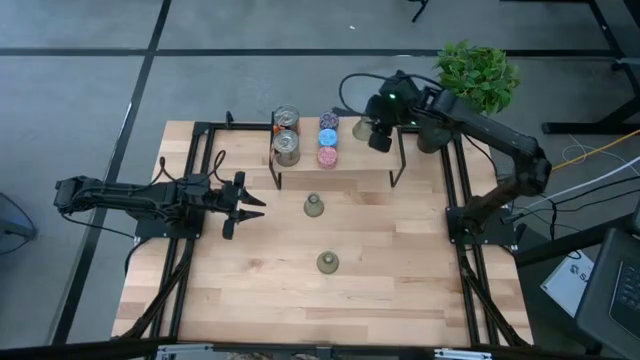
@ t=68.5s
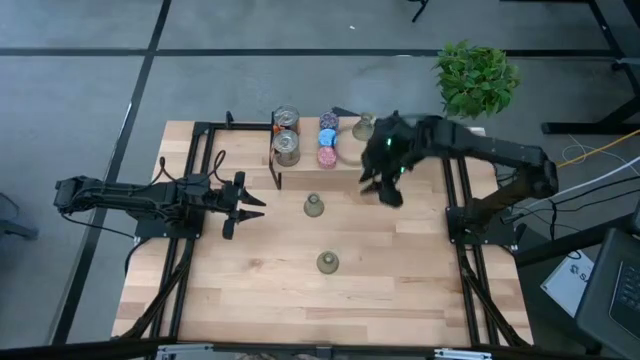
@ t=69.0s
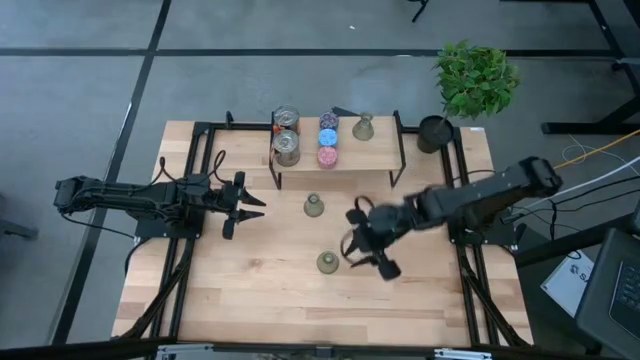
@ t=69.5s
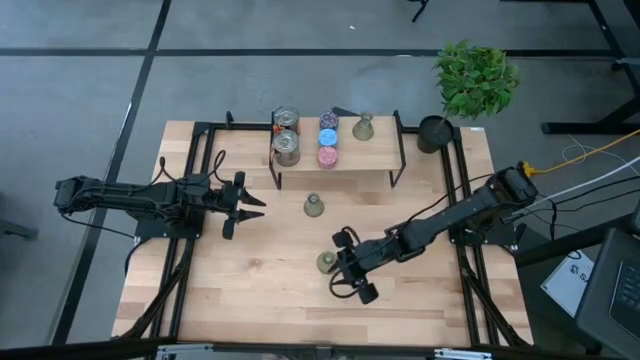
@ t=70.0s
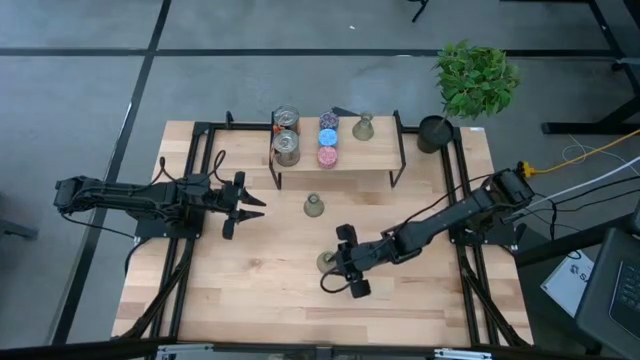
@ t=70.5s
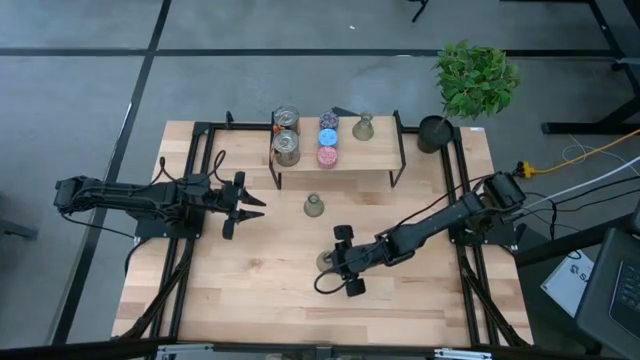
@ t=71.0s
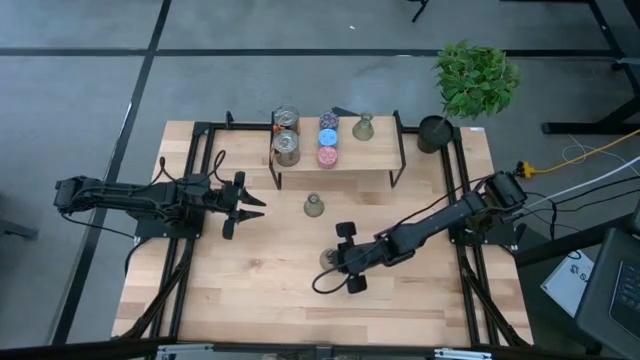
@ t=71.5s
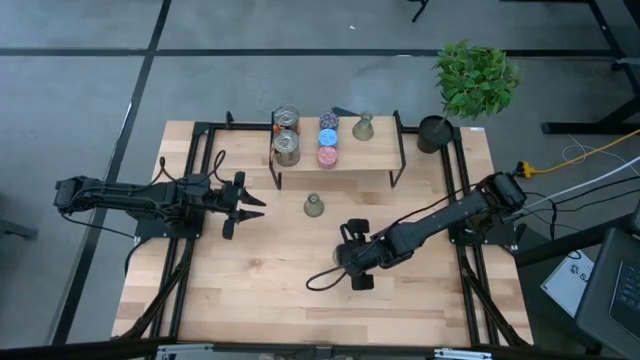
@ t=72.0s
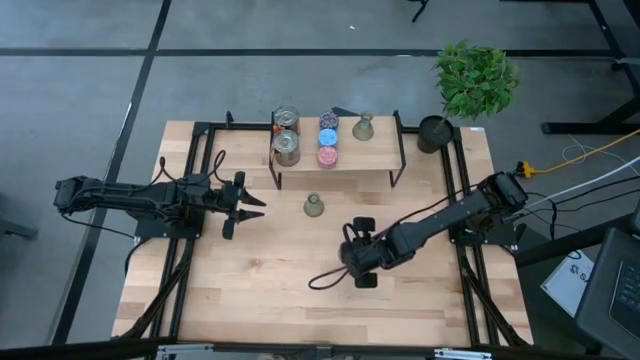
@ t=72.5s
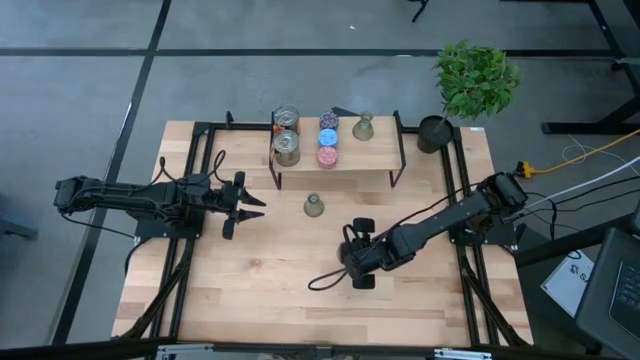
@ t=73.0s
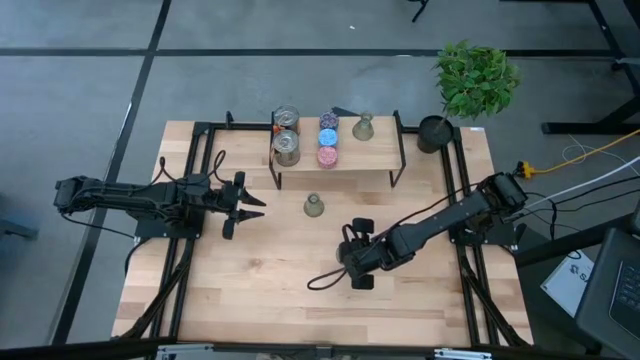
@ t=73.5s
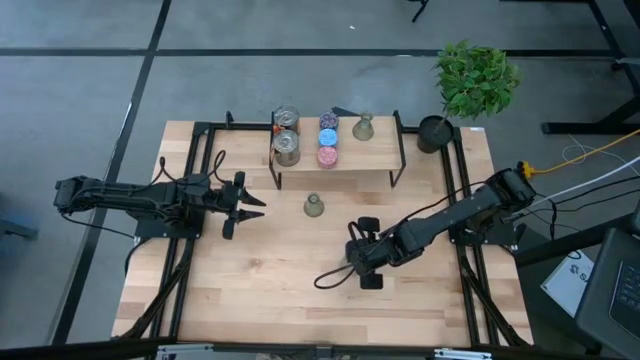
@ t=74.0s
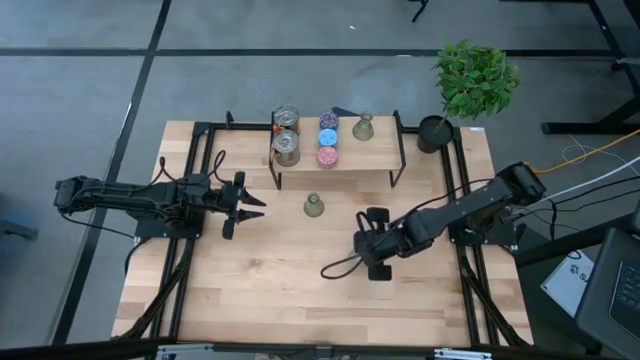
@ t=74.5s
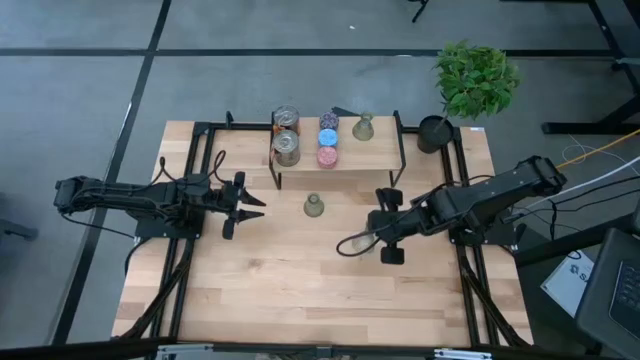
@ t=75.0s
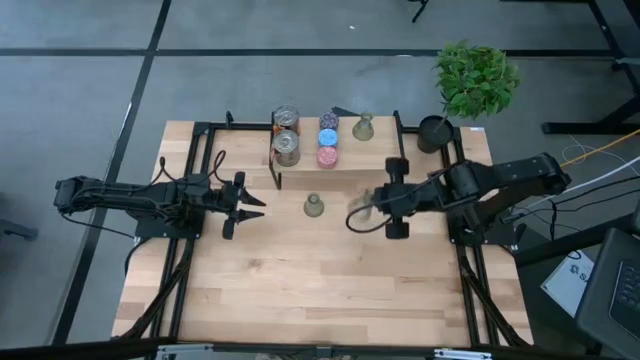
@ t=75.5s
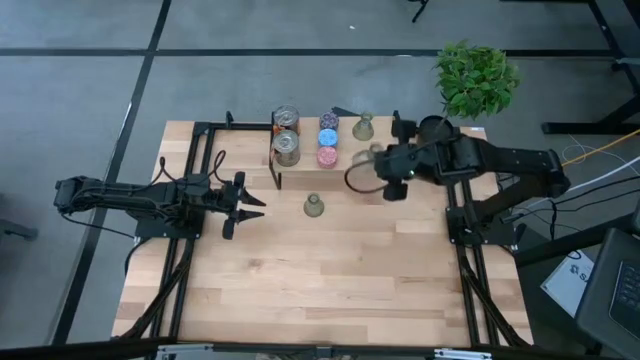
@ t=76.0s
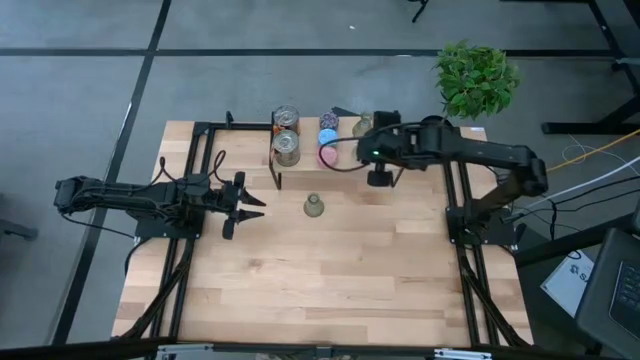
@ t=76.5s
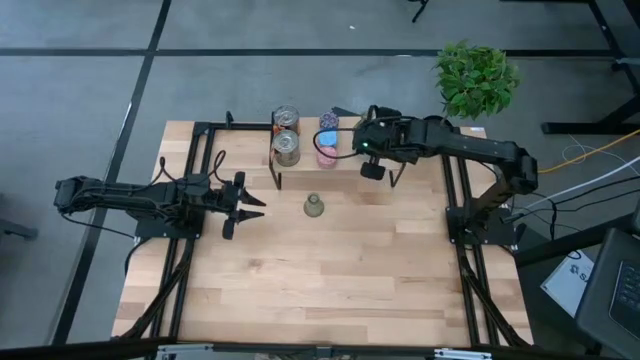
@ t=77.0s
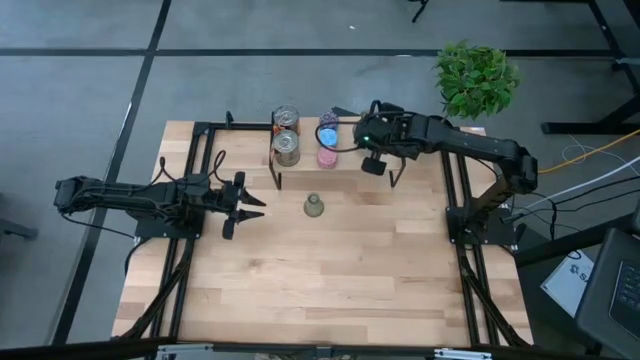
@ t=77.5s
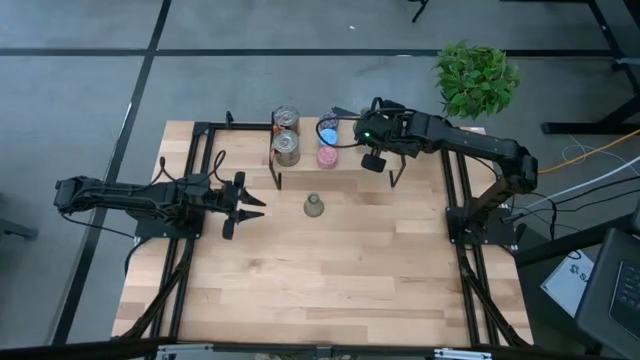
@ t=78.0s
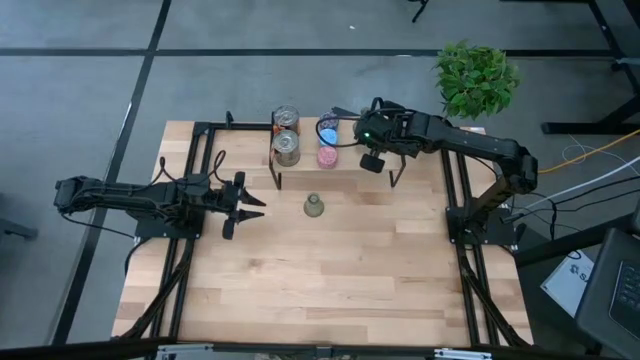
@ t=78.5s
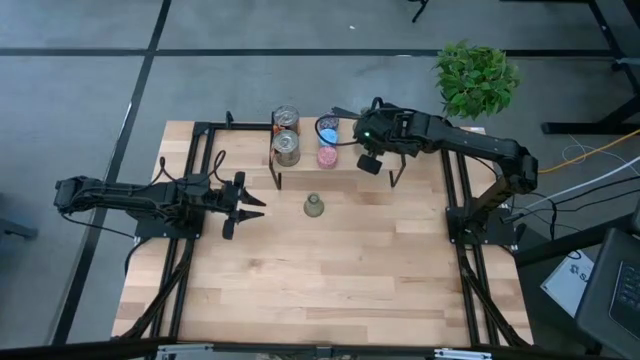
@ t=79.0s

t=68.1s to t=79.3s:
Task: Pick & Place candle stick holders
Put the bottom green glass candle holder on the shelf aligned with the other green glass candle holder

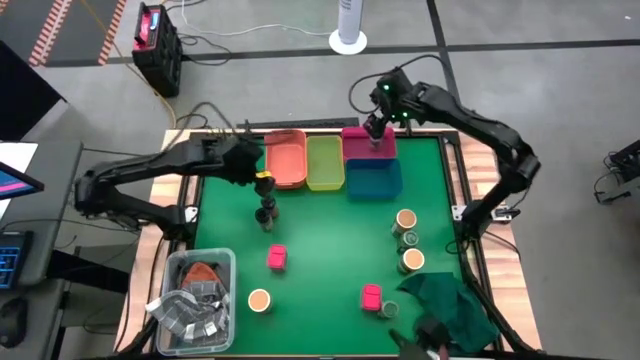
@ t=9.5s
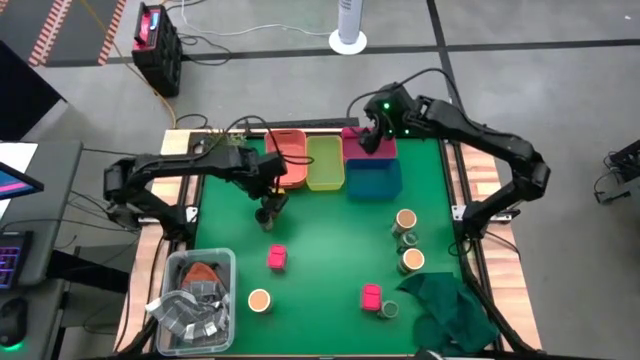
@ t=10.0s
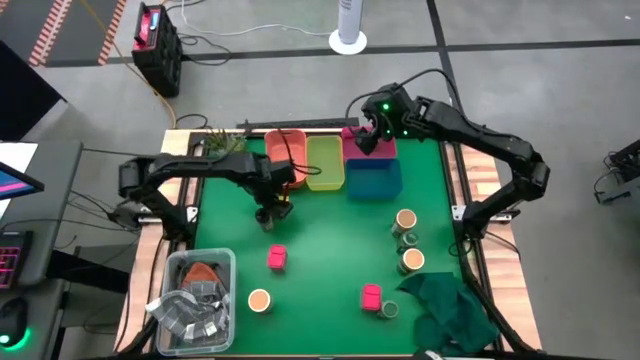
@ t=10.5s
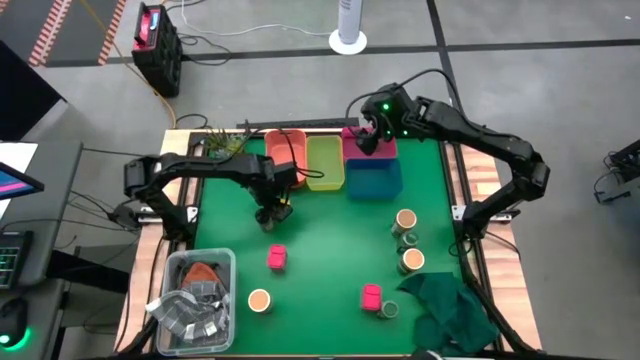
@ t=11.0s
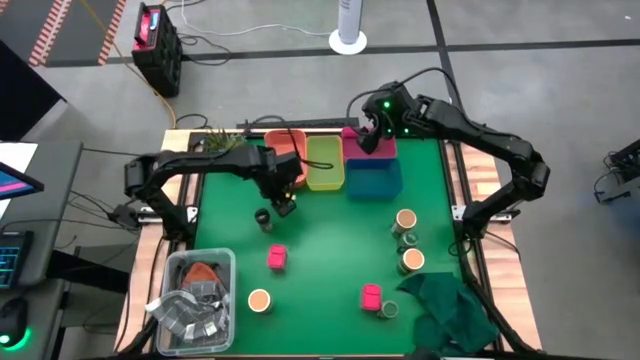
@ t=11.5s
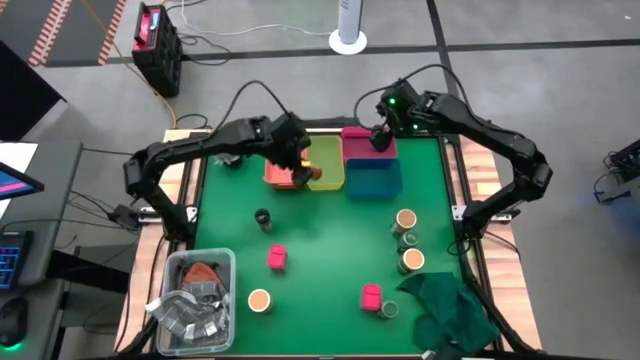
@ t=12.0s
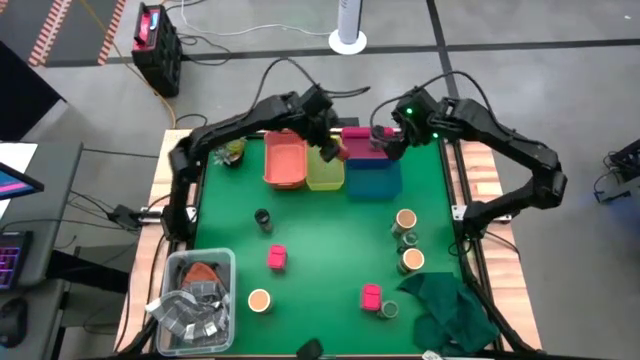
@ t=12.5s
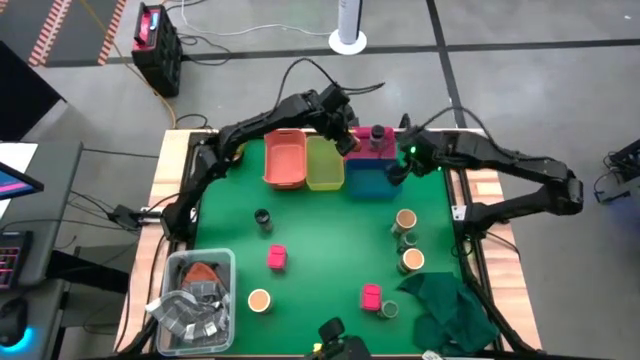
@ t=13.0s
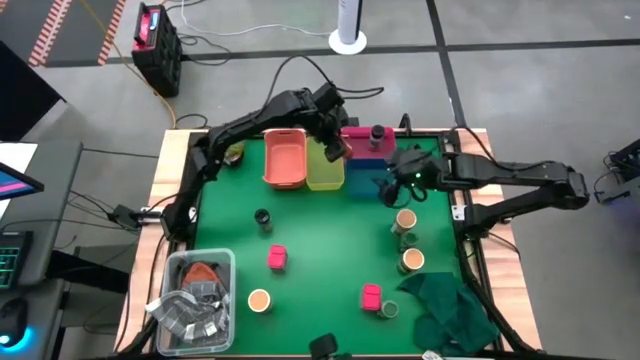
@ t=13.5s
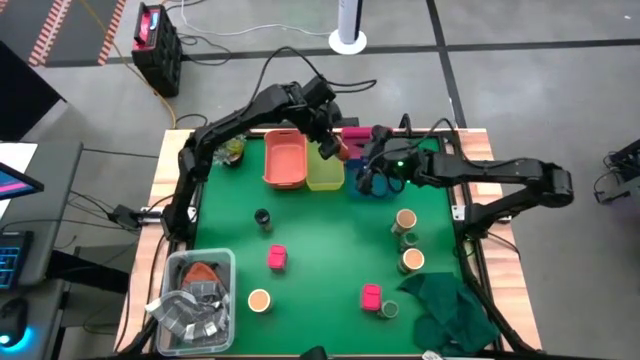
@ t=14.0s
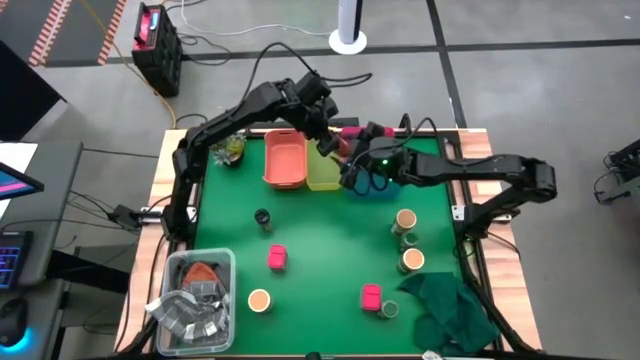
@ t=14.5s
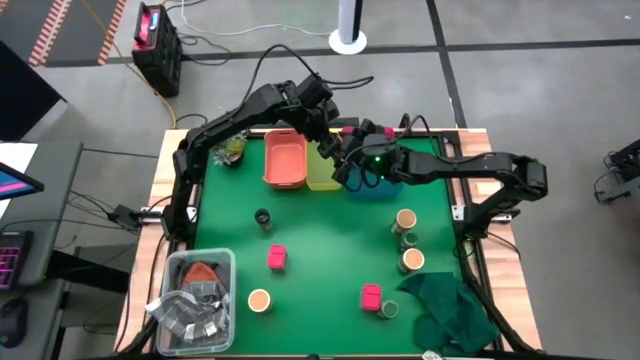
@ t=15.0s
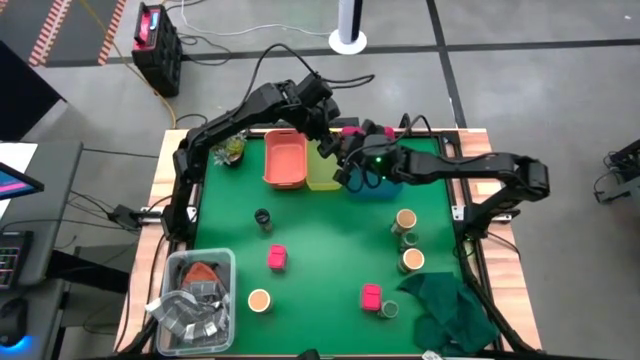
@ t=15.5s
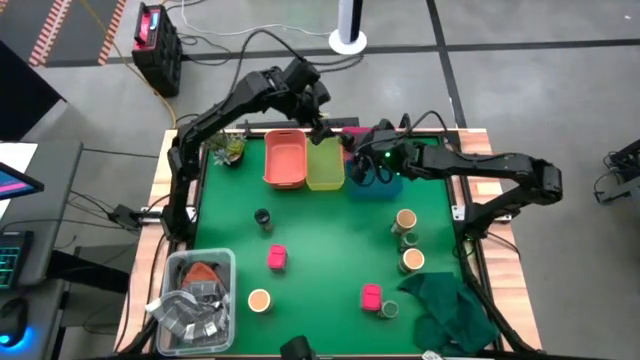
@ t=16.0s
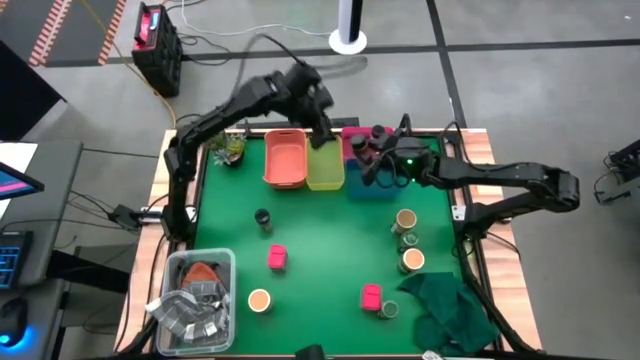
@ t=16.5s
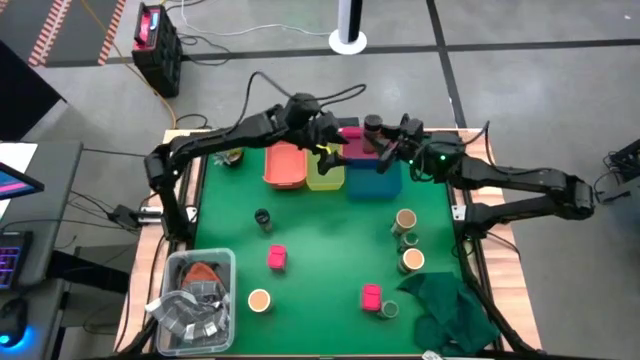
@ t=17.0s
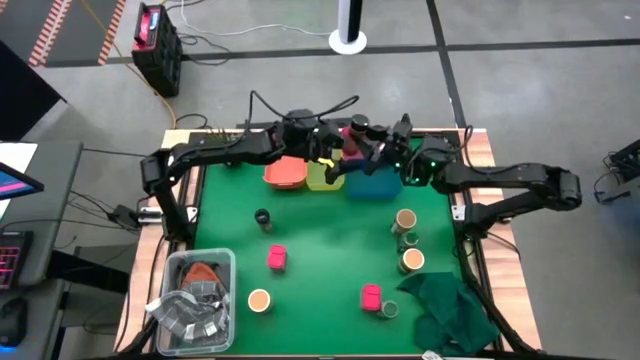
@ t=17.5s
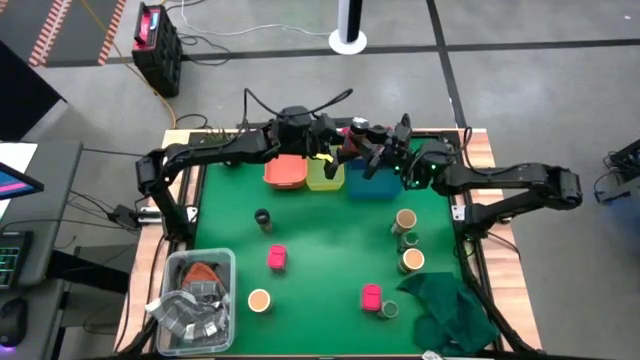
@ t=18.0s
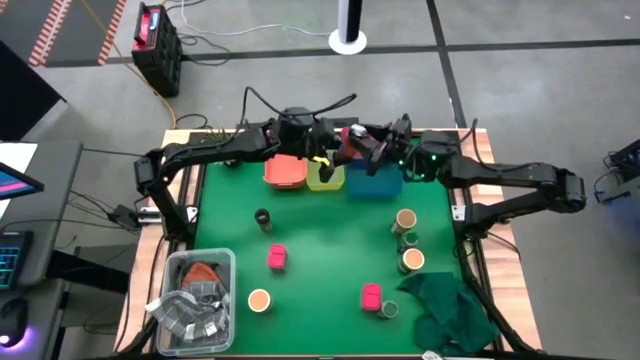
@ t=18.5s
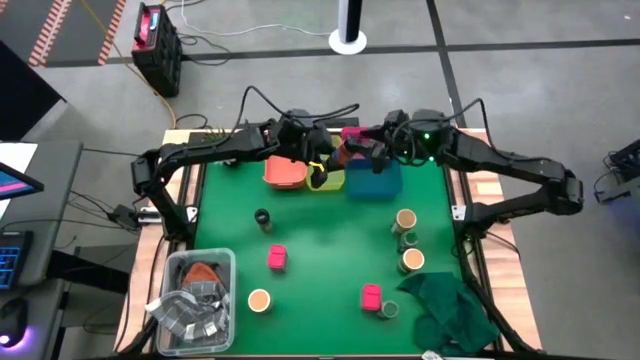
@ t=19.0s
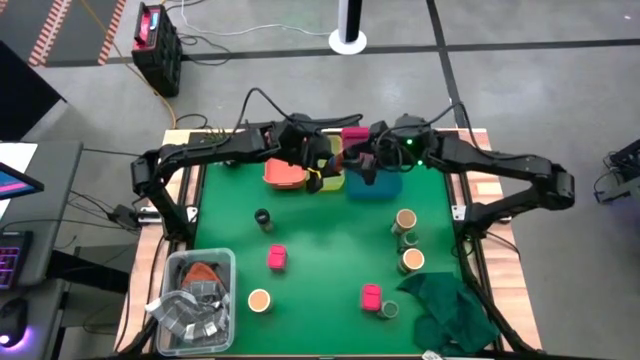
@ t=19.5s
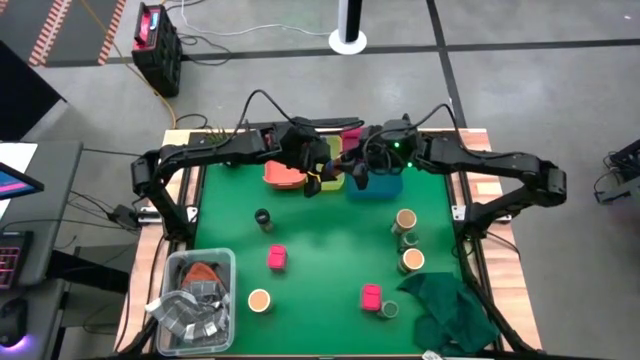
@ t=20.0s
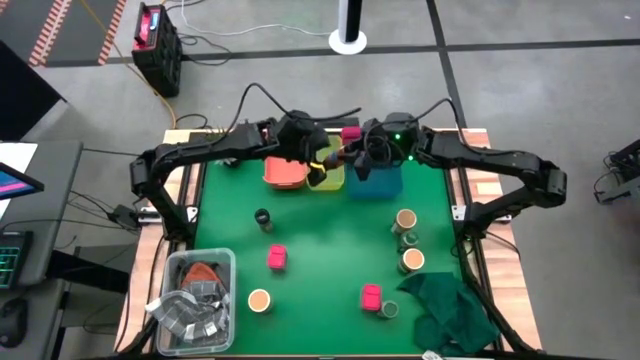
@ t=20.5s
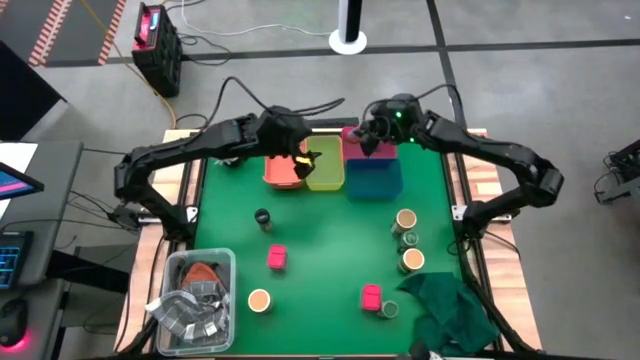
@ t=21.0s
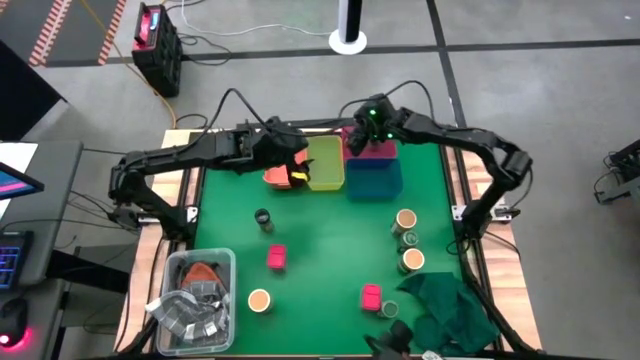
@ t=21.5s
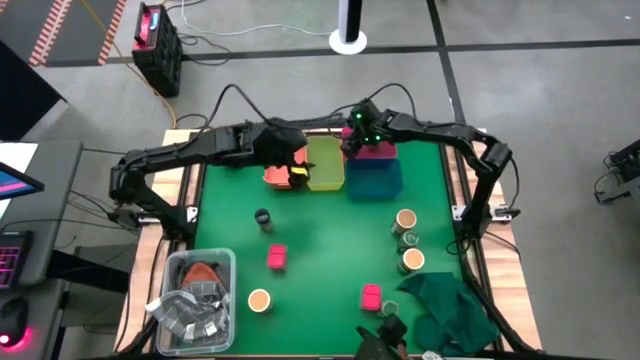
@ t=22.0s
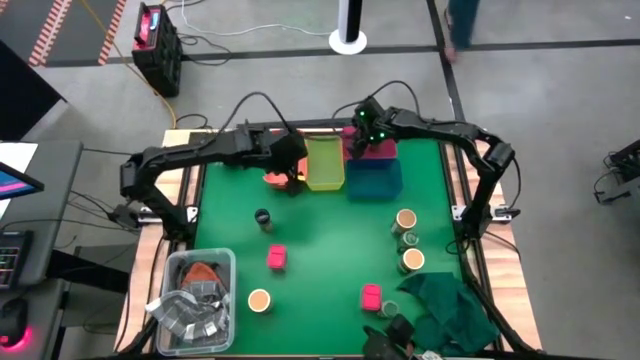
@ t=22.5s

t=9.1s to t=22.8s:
Task: Sort spices by type
Put the top black seasoning bottle into the pink bin
